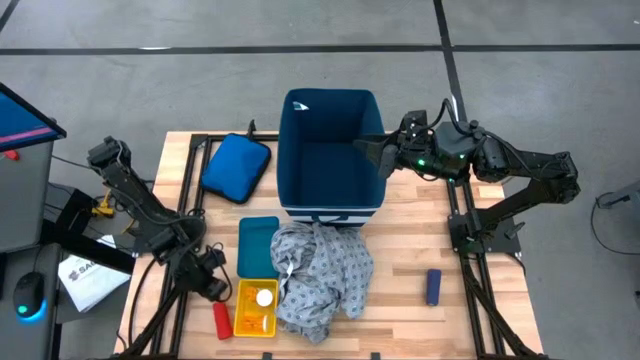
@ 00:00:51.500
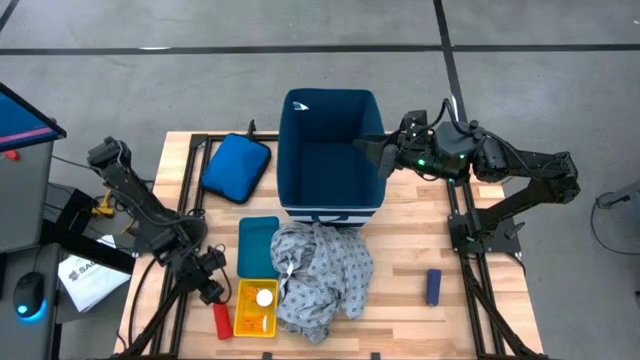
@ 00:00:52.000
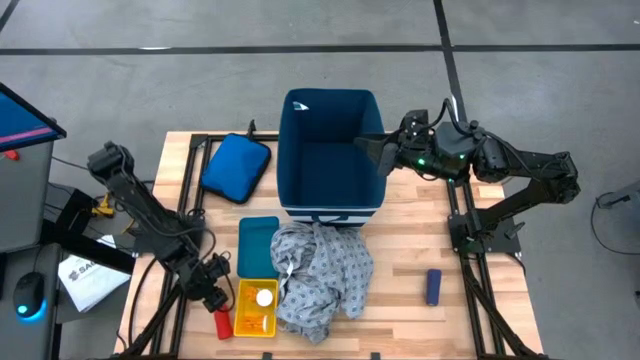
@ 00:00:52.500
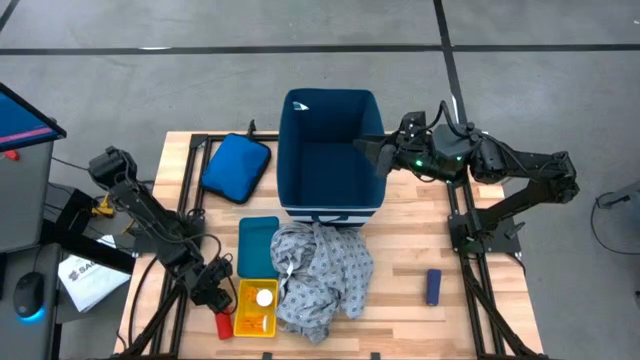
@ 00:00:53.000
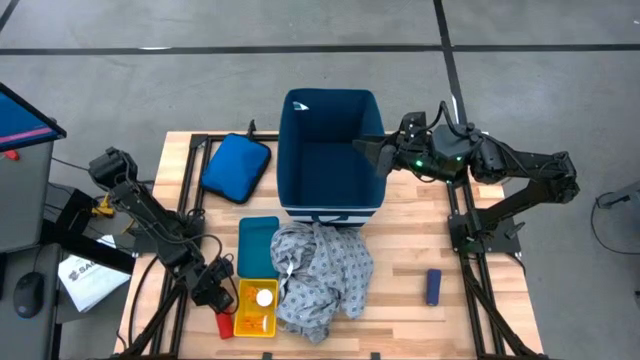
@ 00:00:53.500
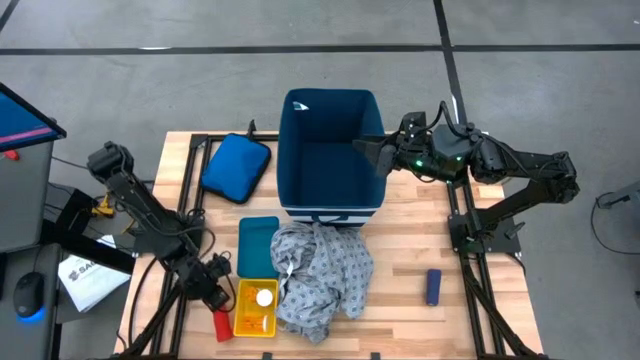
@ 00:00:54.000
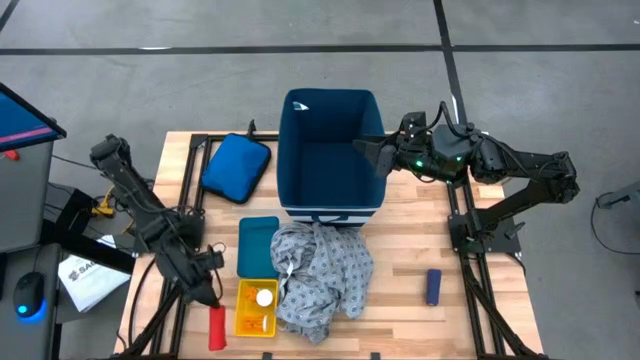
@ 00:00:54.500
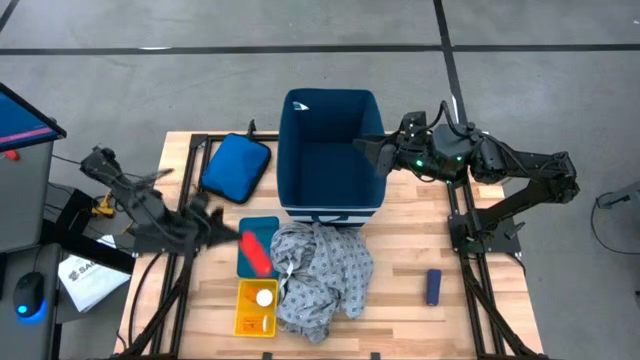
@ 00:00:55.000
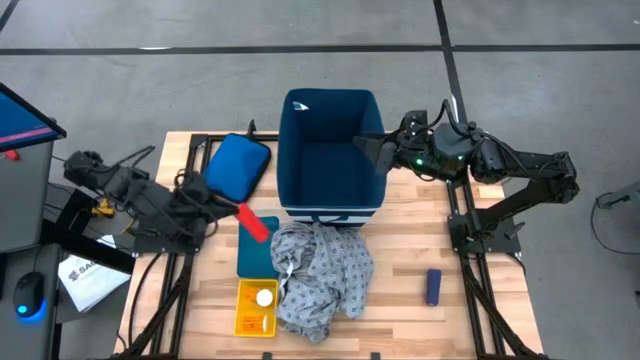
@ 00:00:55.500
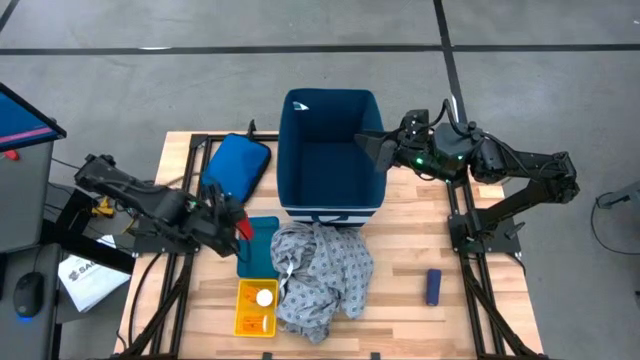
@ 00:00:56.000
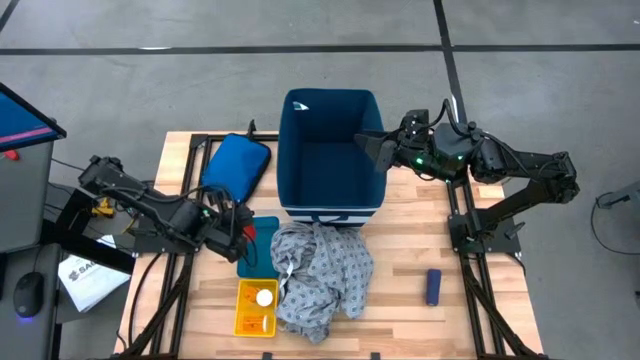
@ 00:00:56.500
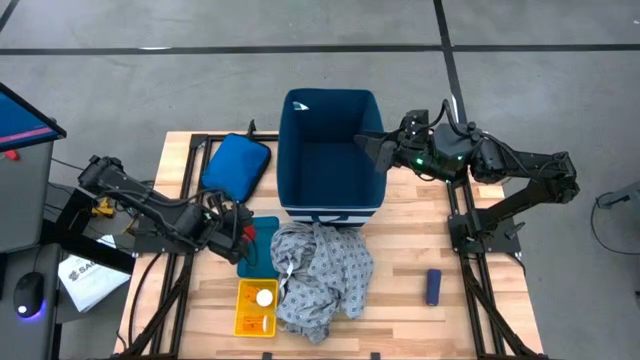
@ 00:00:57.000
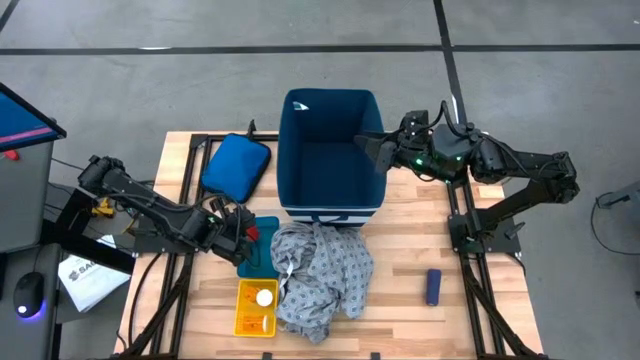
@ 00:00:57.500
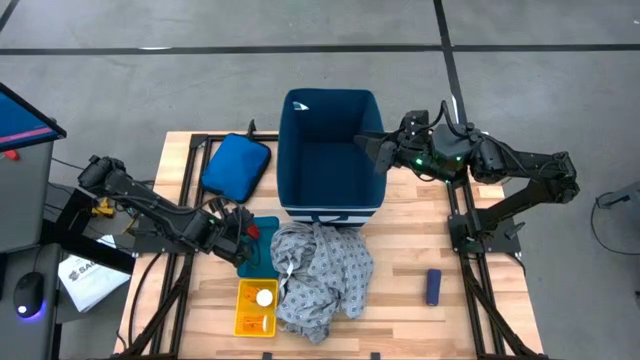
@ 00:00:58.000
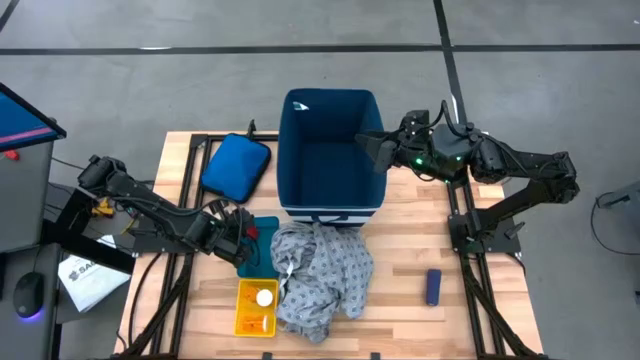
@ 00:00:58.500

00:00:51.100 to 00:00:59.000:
Task: Pick & place medical supplies in basket/bin
Put the red bandage into the blue bin

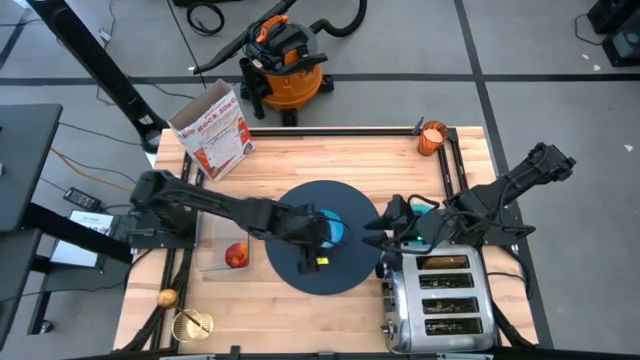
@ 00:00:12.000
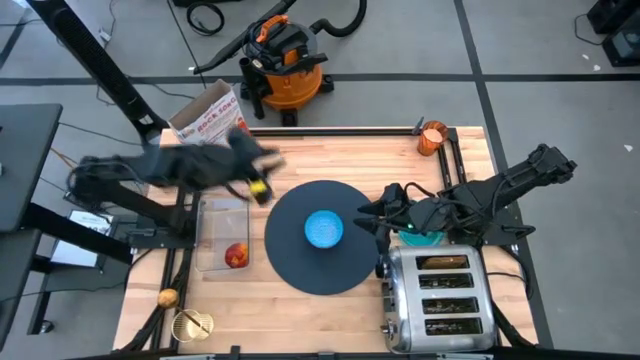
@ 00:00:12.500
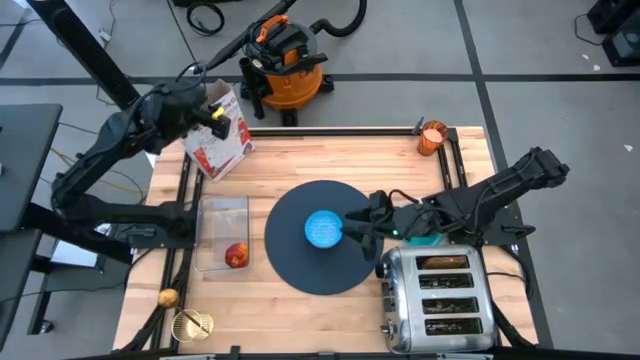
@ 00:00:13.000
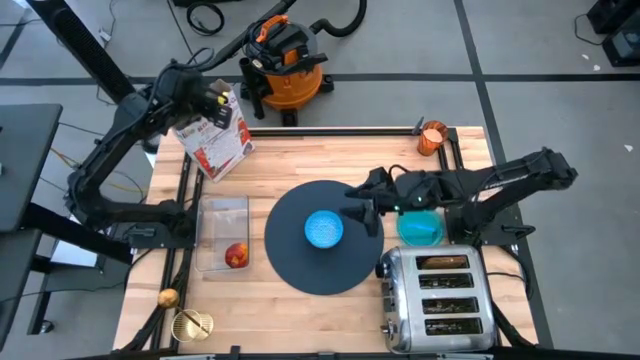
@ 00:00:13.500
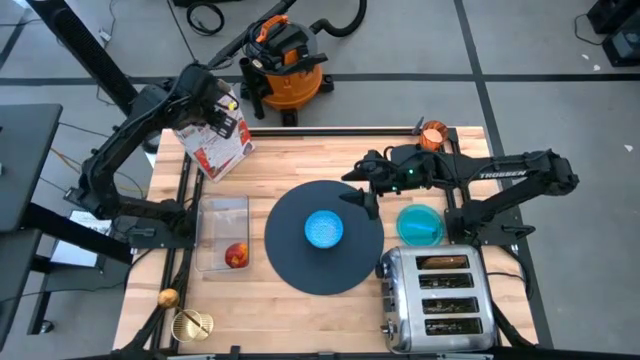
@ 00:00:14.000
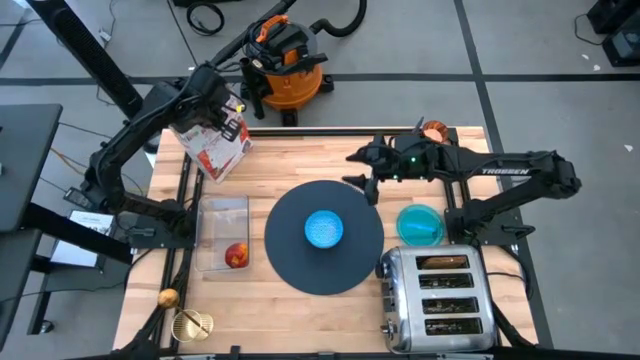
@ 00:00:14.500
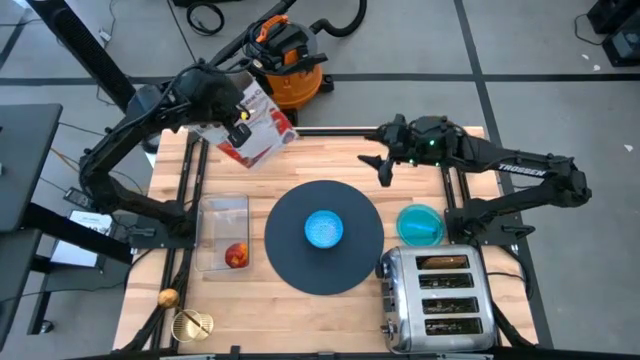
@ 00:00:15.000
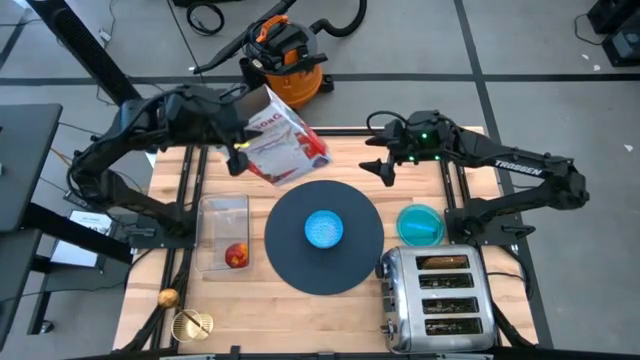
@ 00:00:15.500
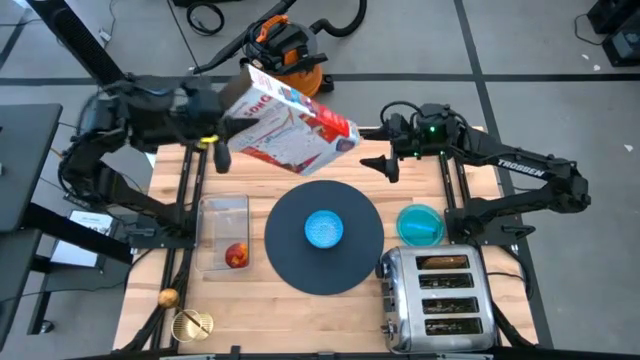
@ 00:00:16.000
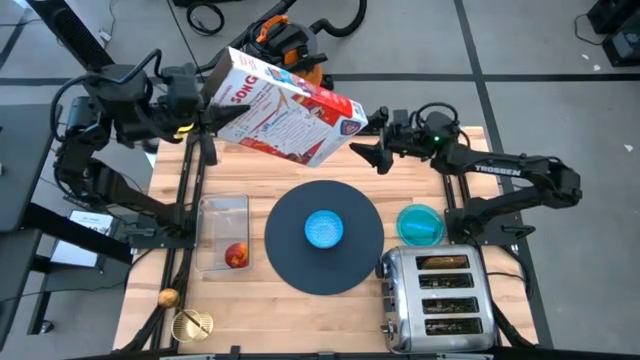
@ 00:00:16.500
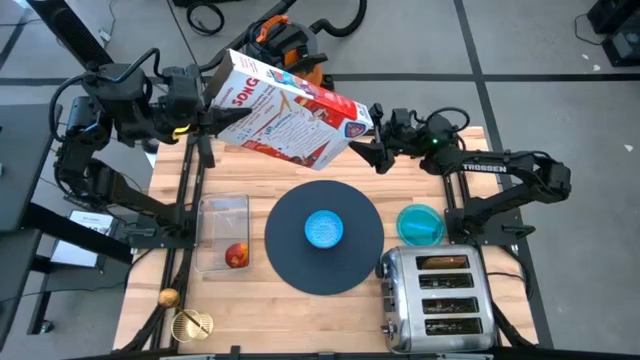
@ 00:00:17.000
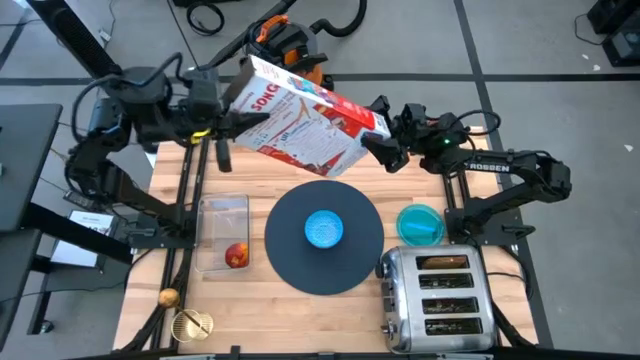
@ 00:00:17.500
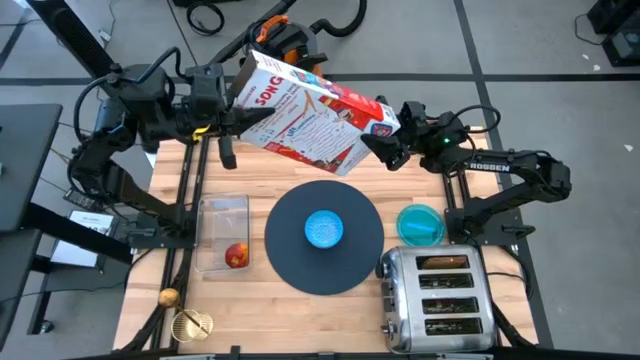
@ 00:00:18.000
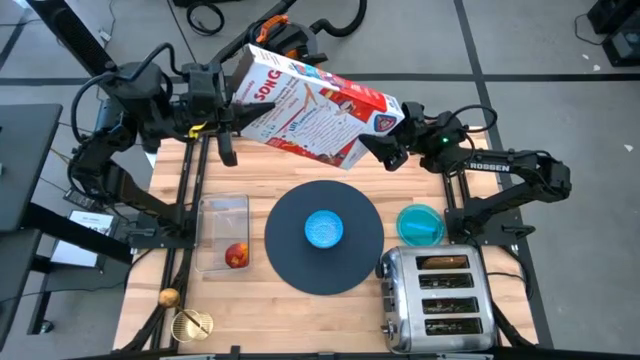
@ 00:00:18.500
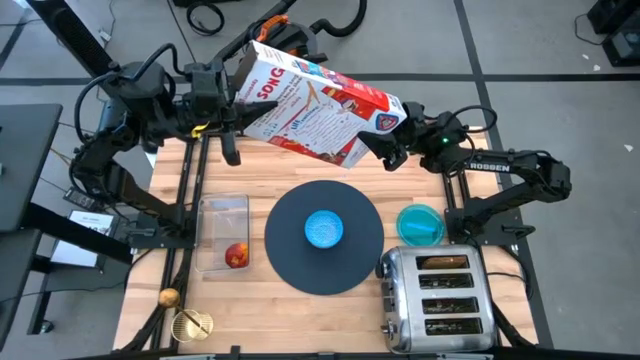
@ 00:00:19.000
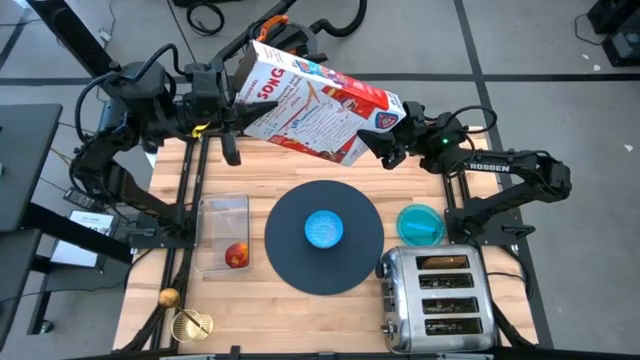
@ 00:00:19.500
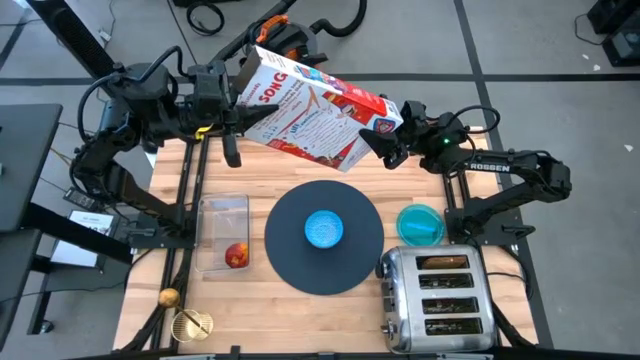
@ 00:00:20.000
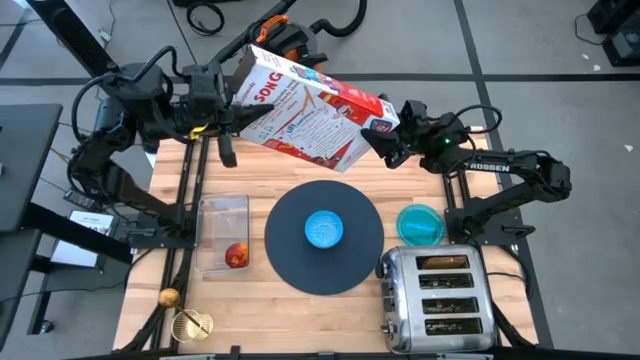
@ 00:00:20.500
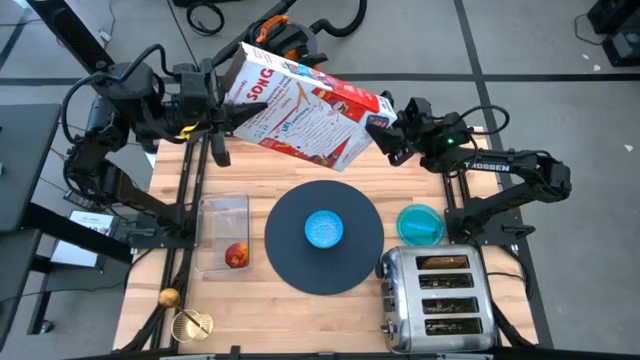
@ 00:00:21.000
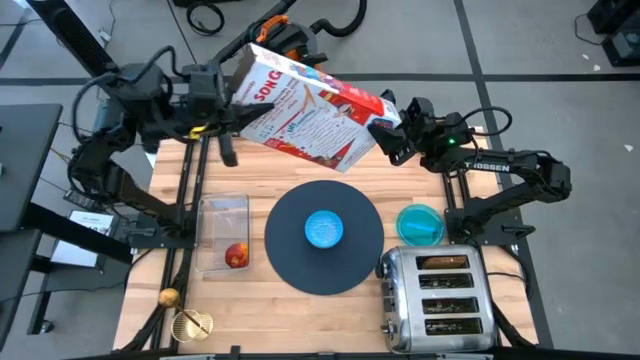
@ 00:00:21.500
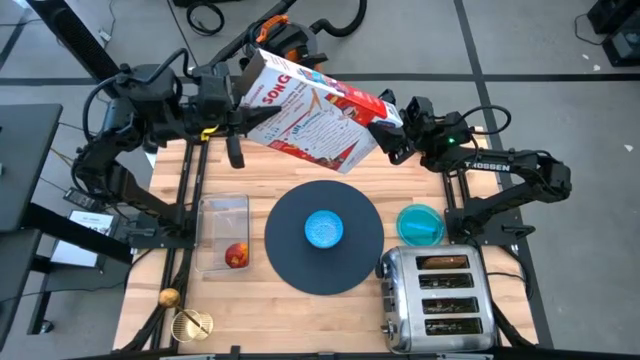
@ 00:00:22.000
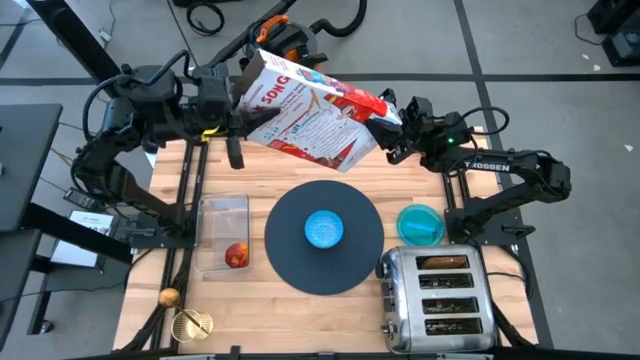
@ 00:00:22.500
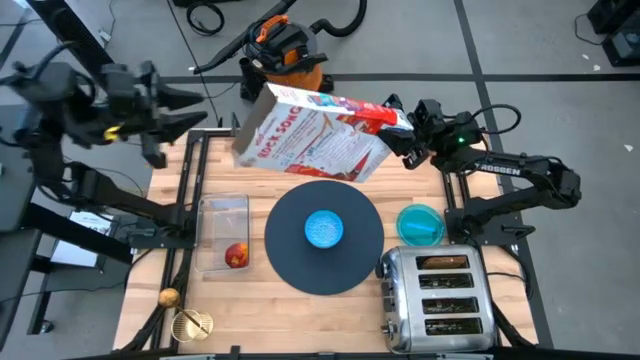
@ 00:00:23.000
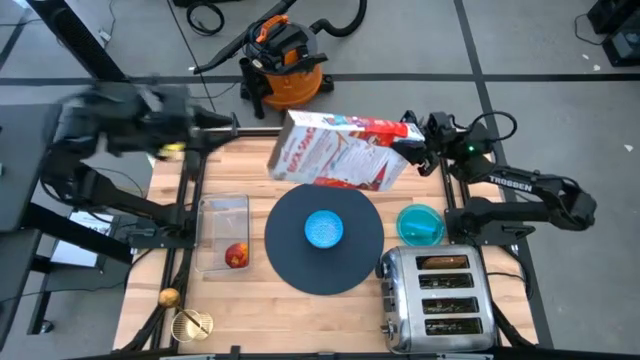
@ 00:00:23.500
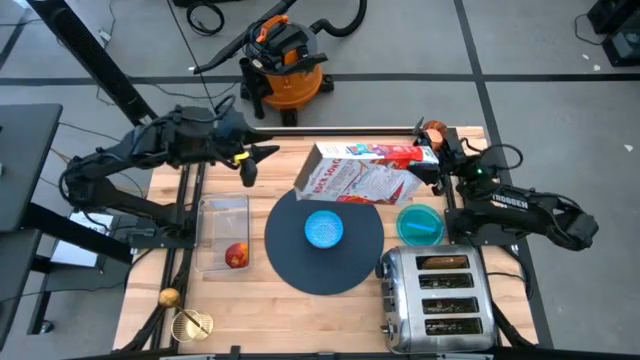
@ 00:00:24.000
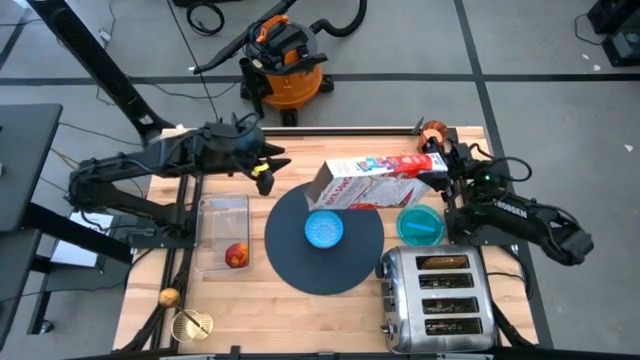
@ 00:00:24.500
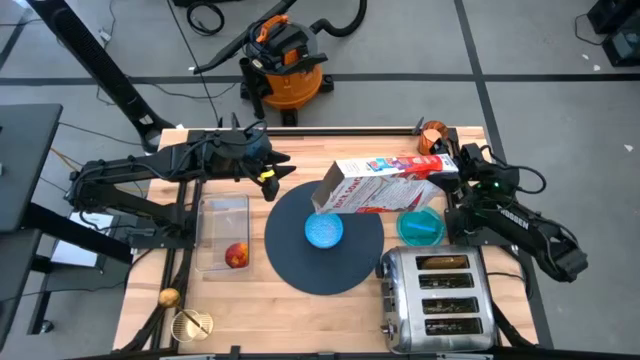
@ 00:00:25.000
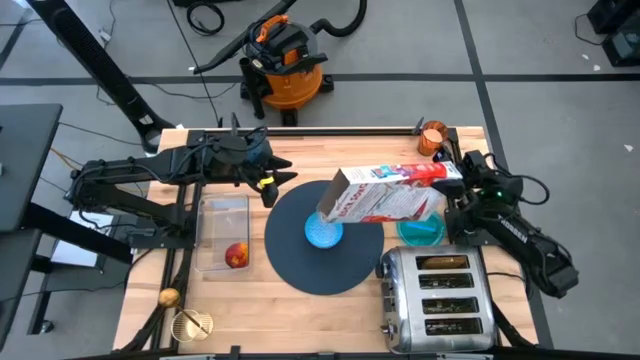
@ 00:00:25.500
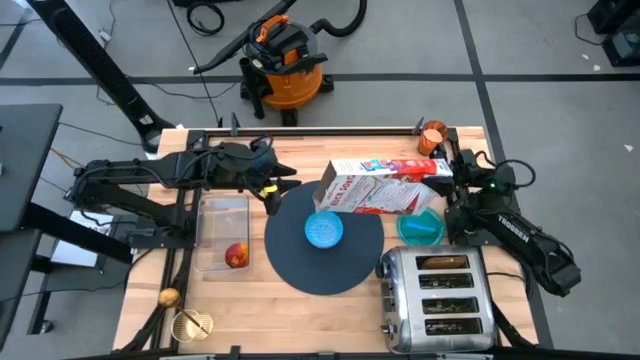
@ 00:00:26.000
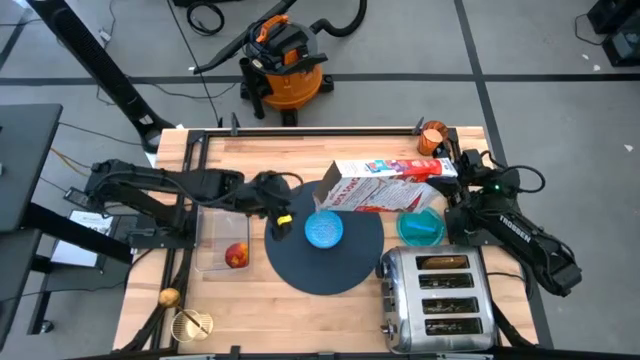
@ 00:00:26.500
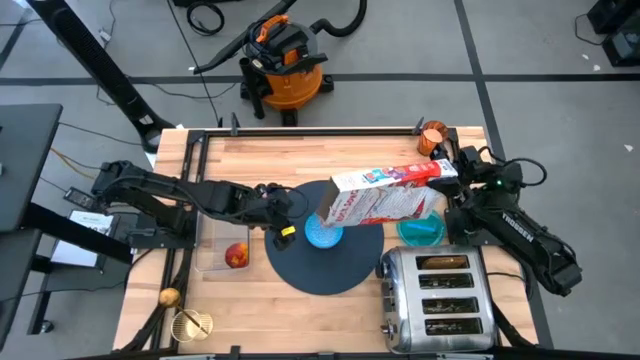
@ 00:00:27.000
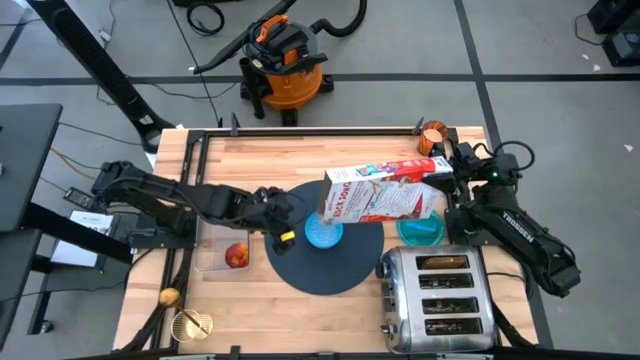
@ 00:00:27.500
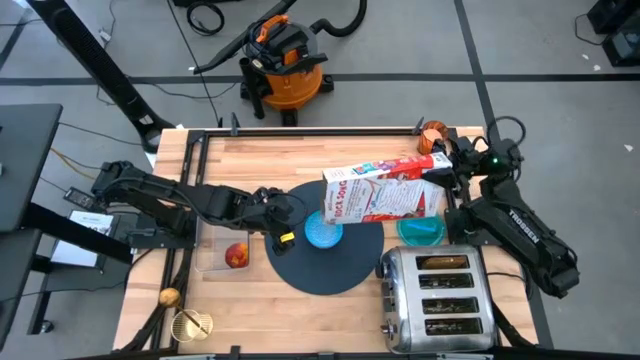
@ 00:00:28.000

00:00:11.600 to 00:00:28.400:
Task: Arrange a breakfast setting
Pour the cereal from the cereal box into a blue bowl
